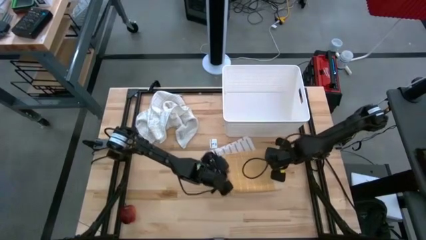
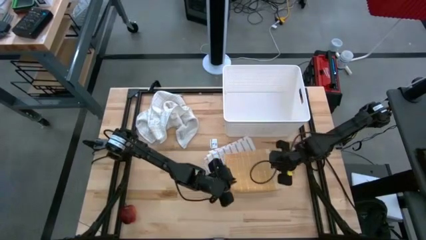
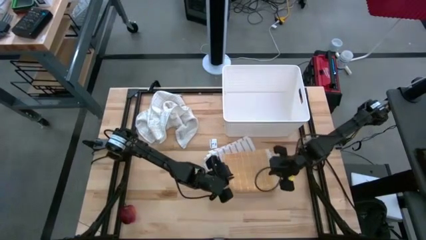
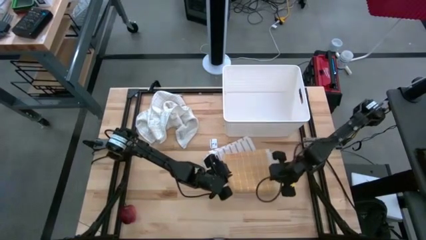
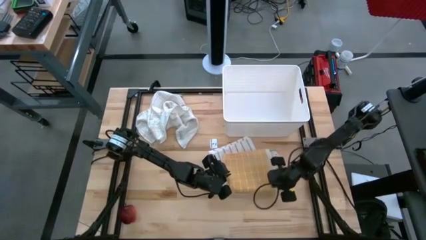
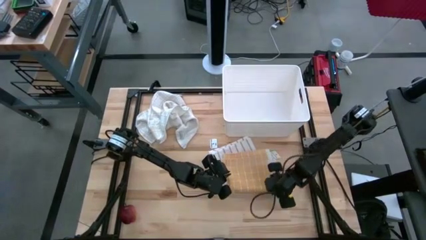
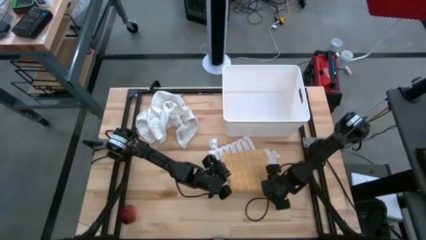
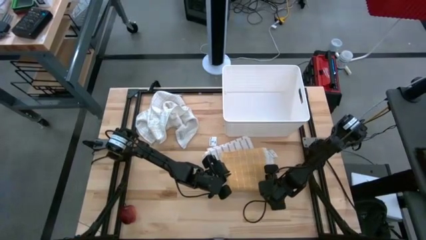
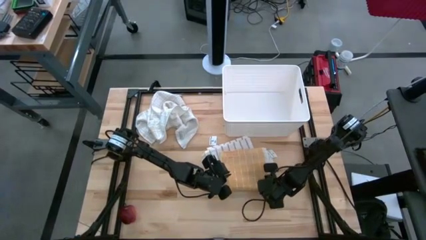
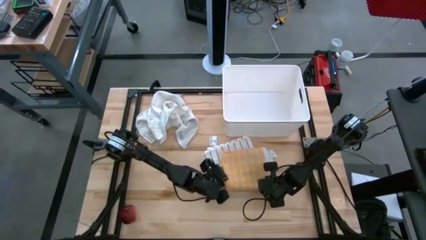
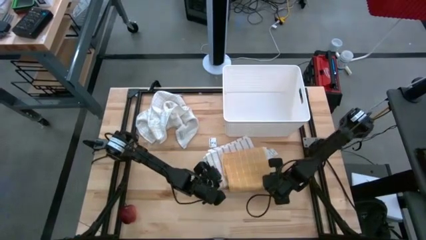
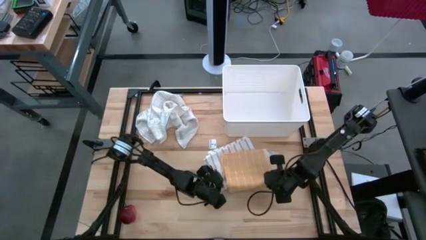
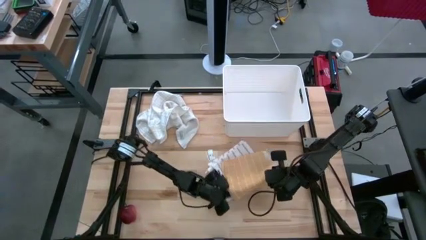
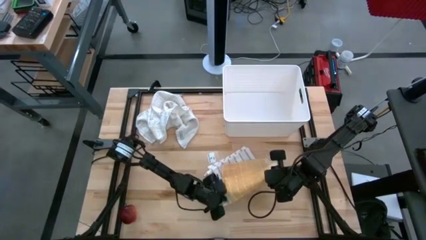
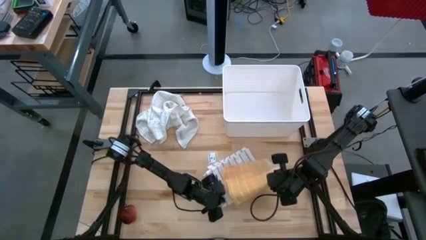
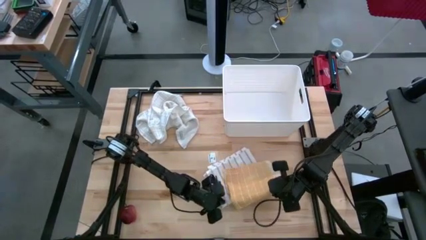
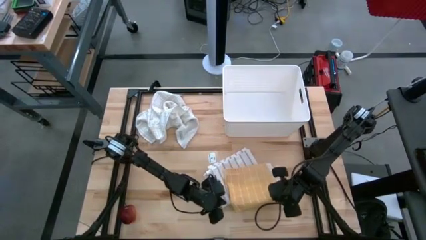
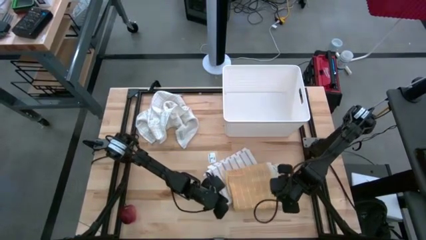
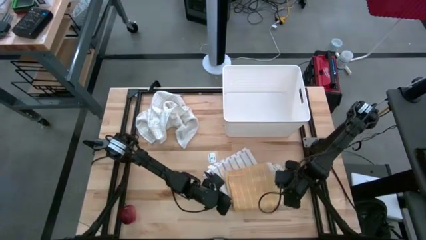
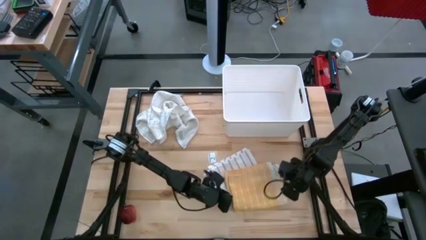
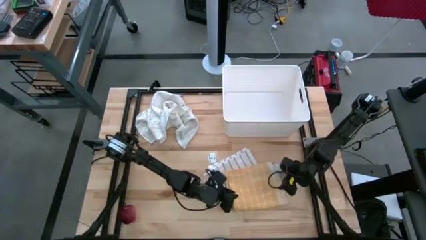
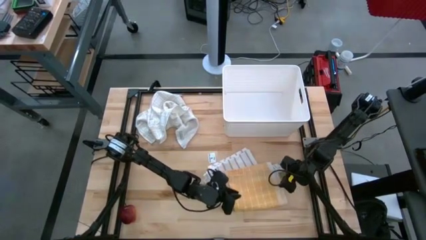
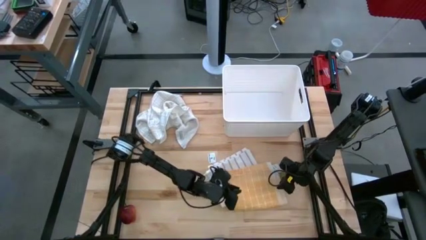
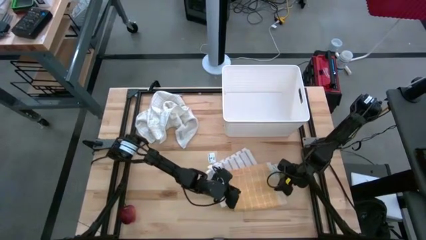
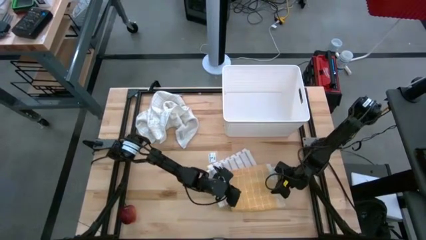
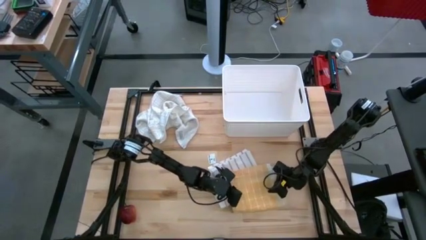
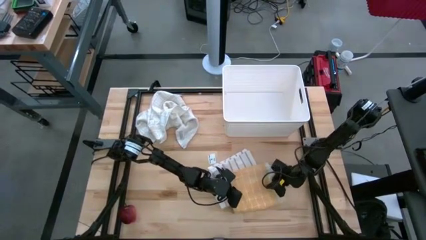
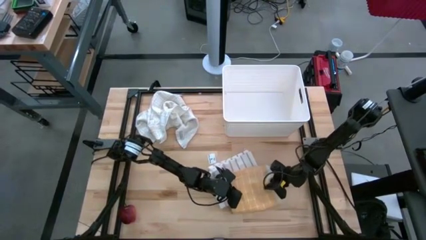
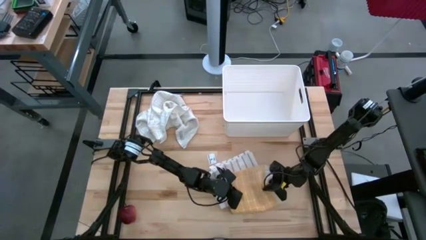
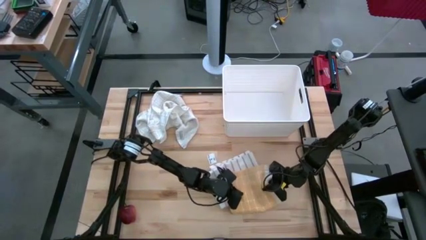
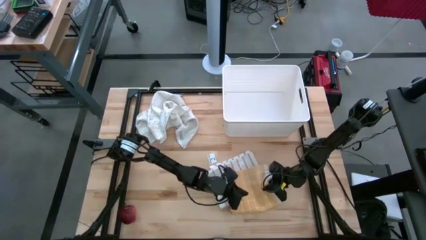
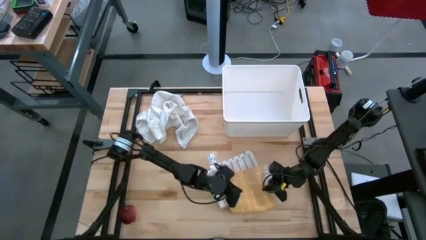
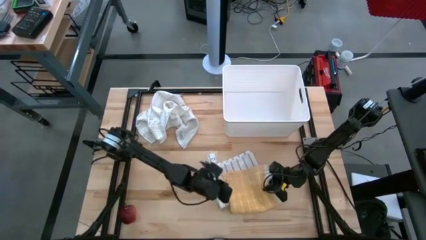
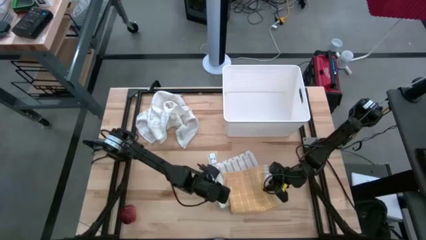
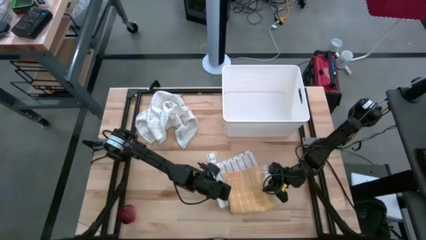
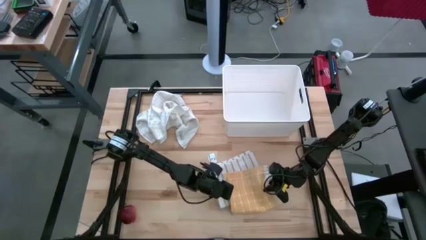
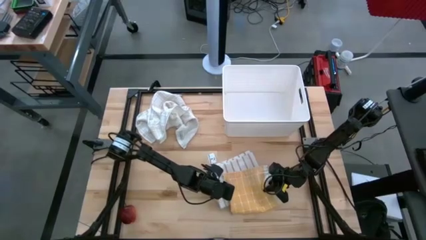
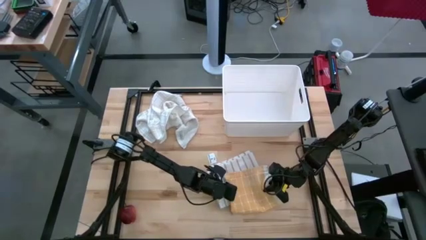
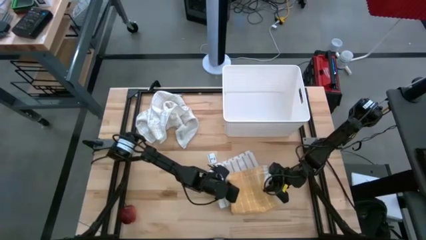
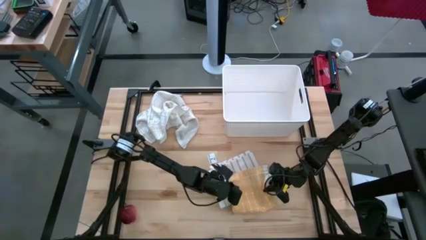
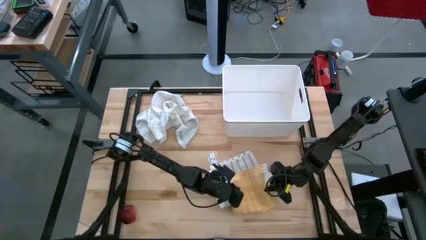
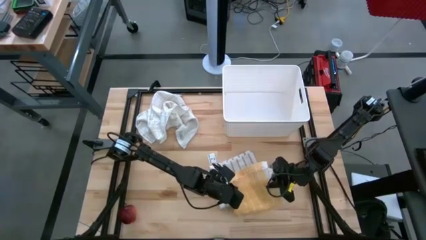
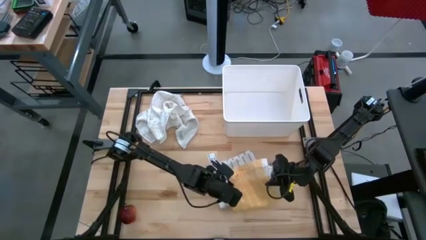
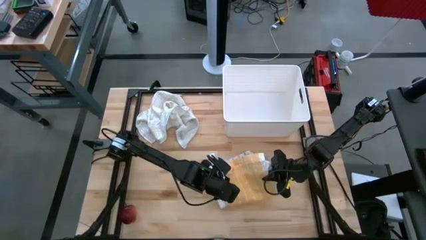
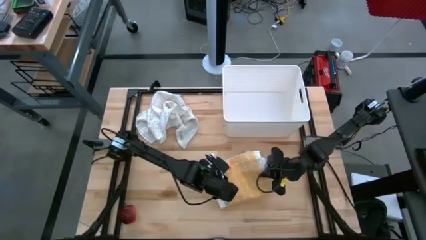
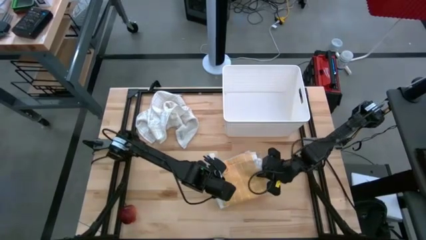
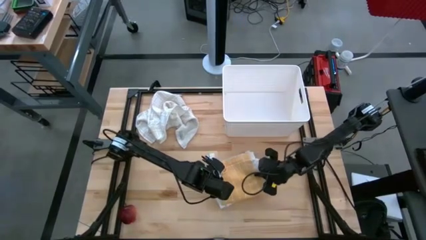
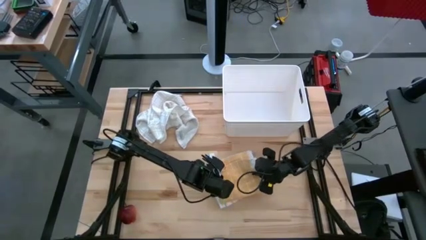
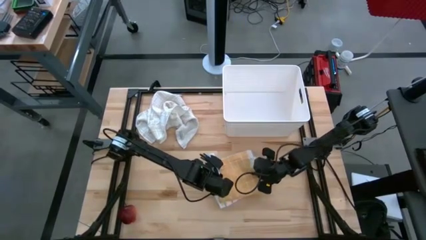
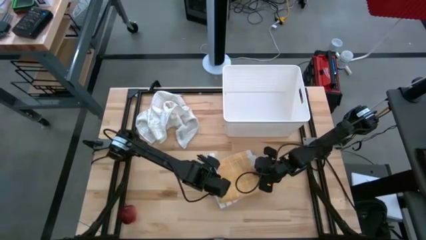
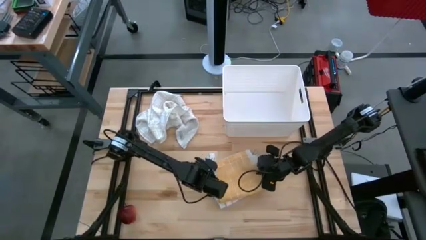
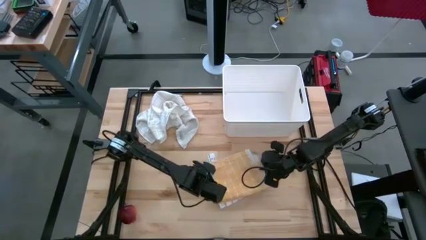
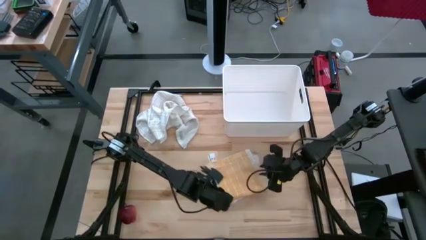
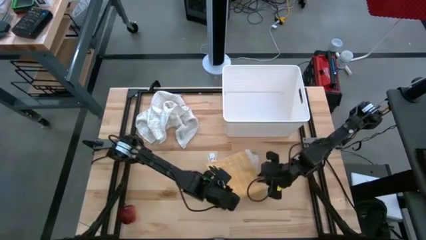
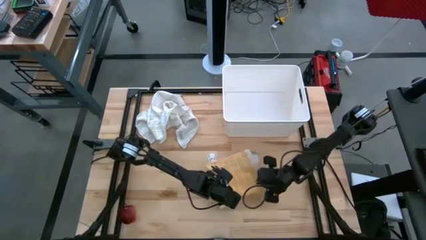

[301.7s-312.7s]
Task: Fold towel
Stack the yellow squared towel on top of the white striped towel

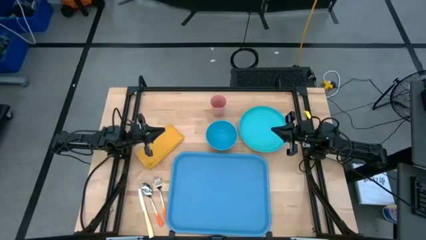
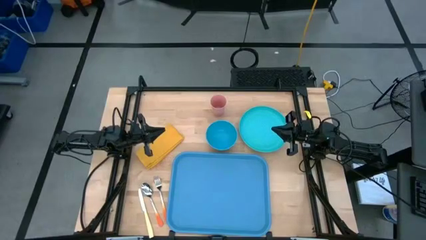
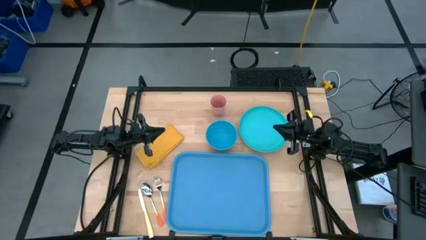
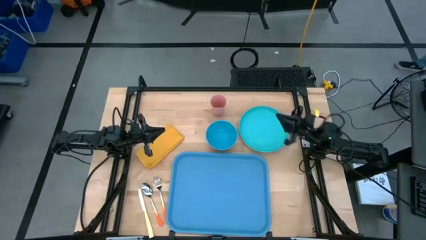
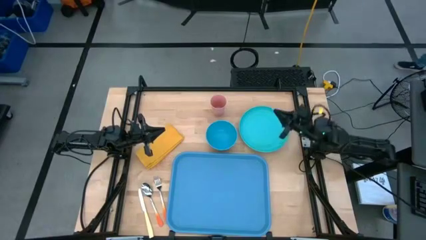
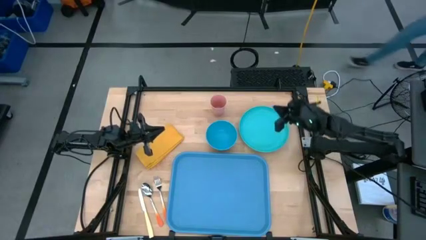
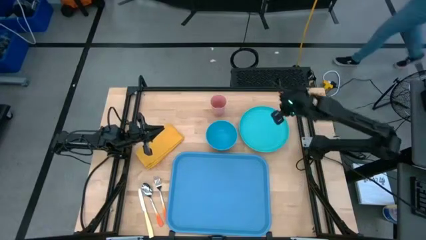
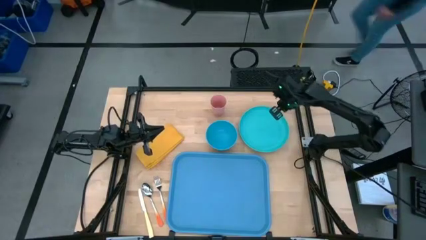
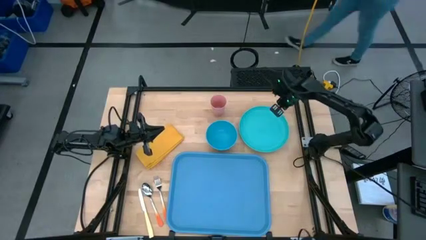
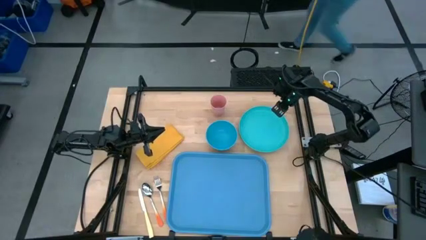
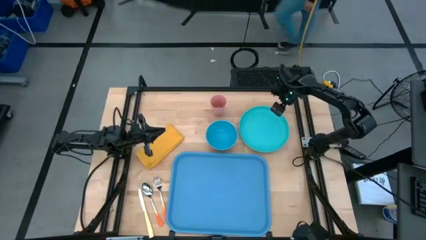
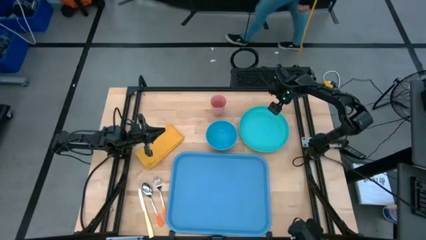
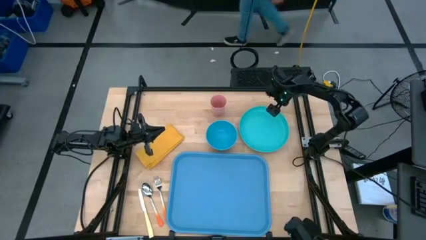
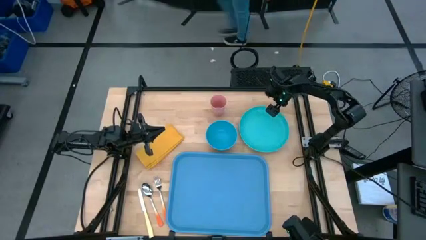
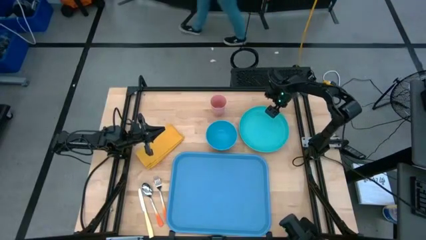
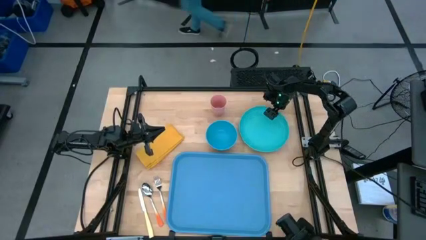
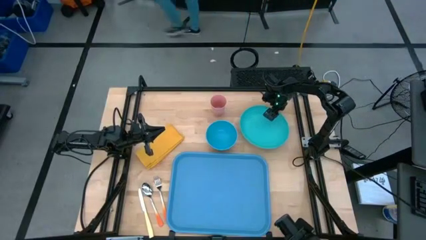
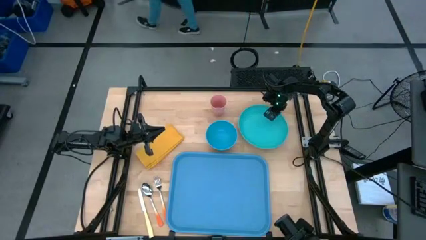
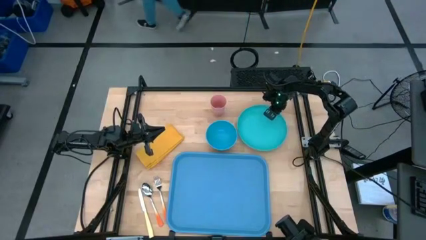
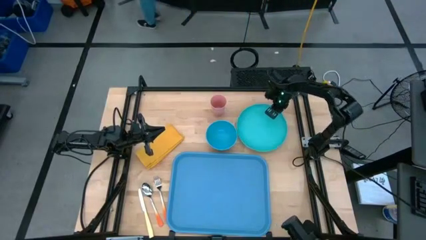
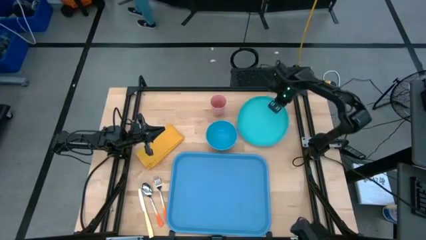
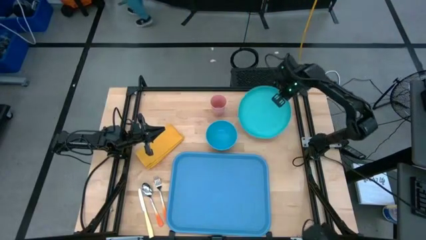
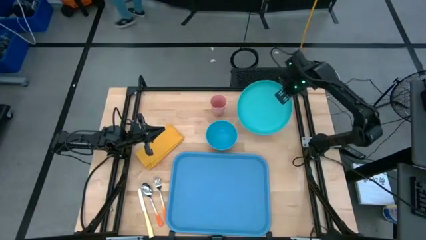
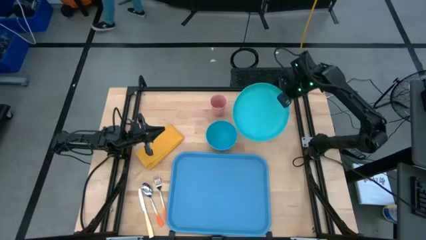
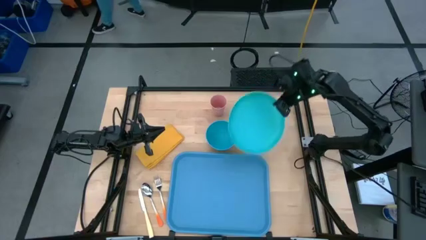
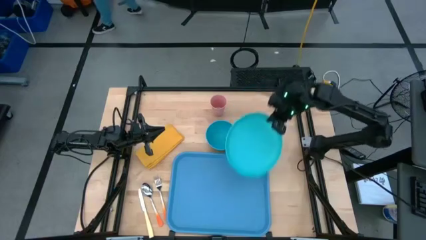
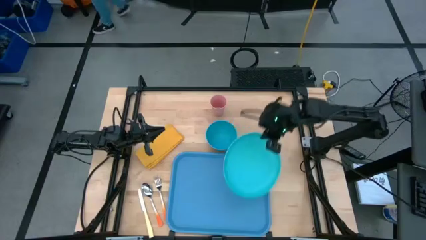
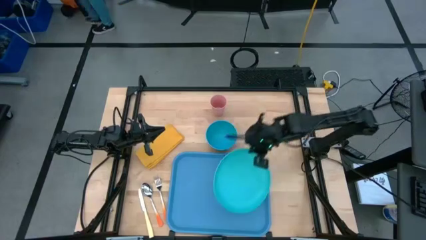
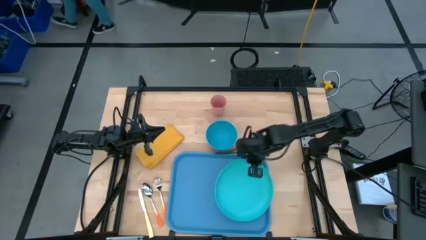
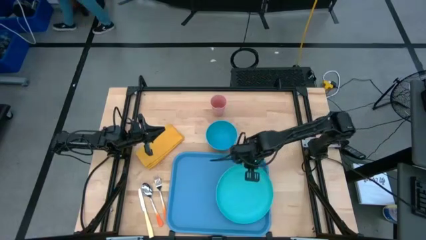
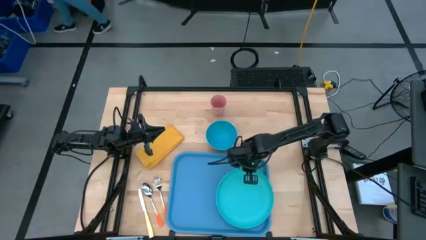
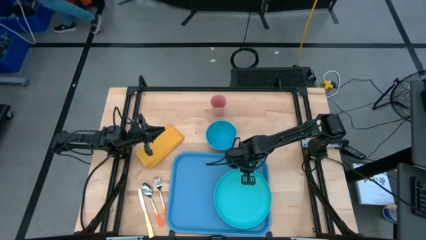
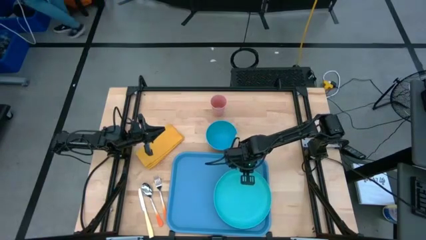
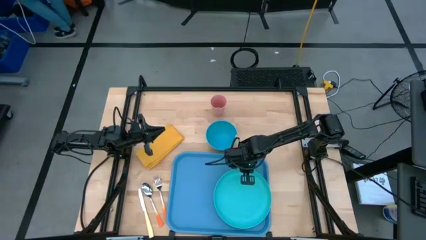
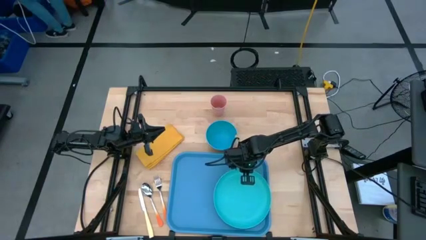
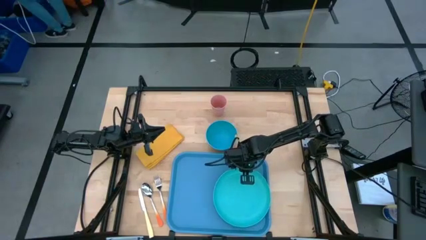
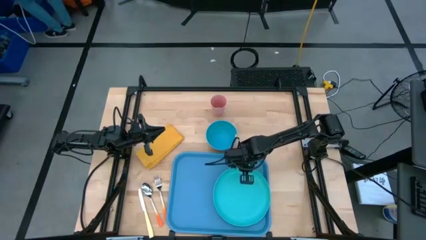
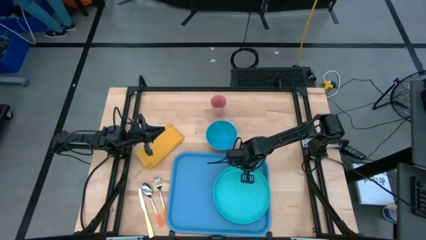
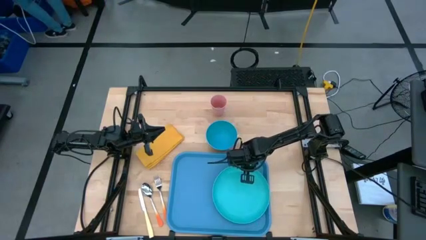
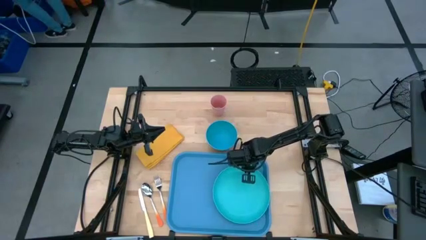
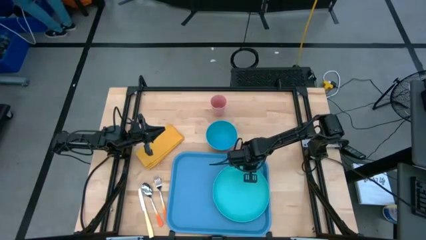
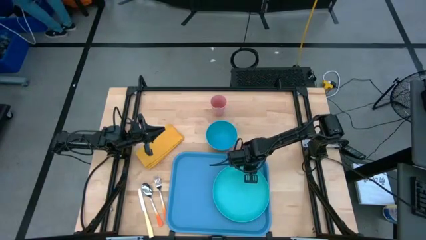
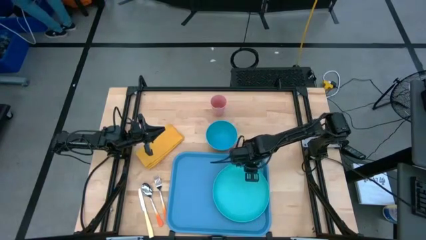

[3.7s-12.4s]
Task: Set up tray
Put the light blue plate on the blue tray
